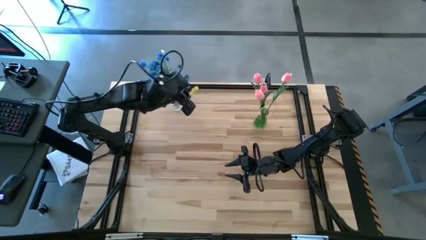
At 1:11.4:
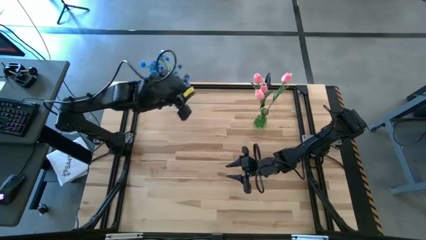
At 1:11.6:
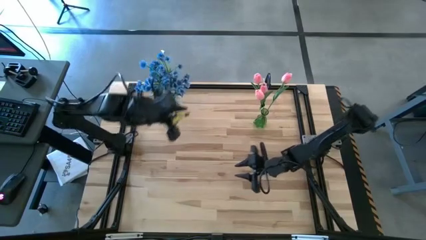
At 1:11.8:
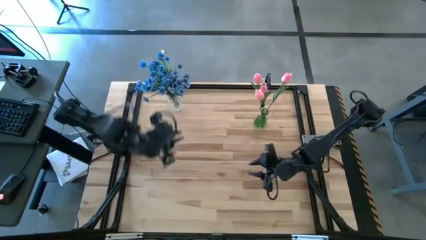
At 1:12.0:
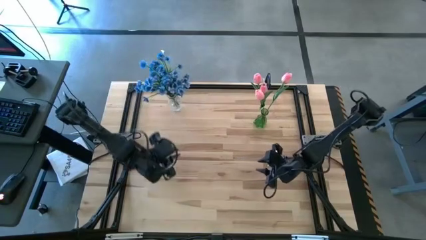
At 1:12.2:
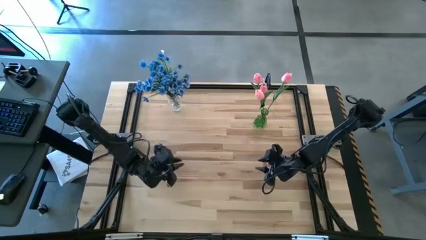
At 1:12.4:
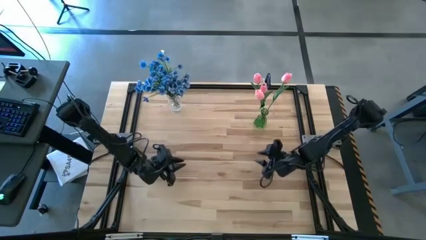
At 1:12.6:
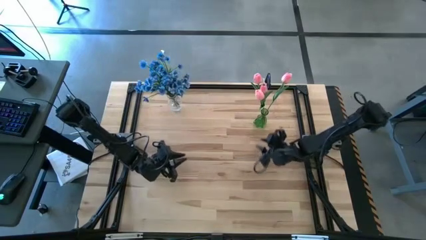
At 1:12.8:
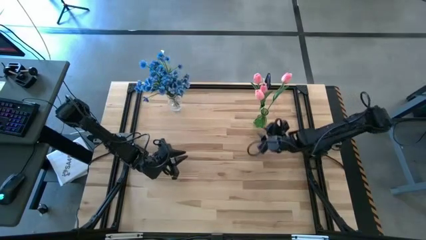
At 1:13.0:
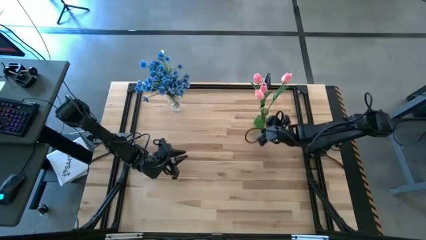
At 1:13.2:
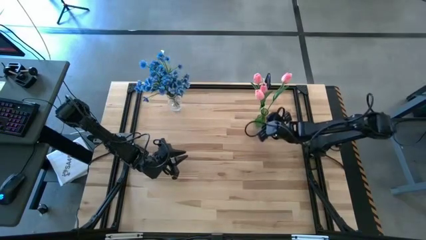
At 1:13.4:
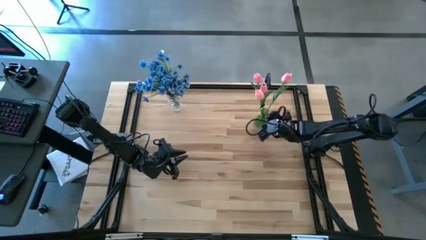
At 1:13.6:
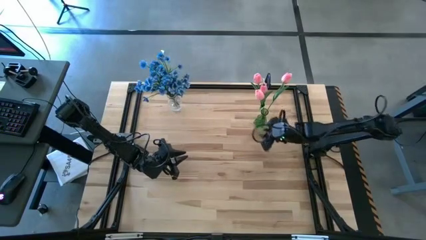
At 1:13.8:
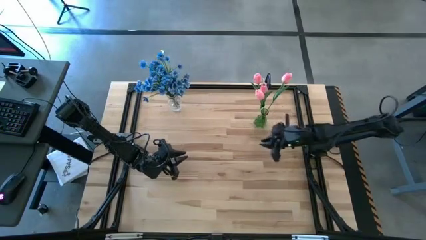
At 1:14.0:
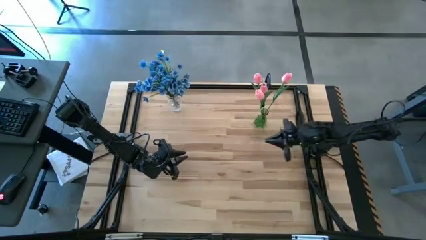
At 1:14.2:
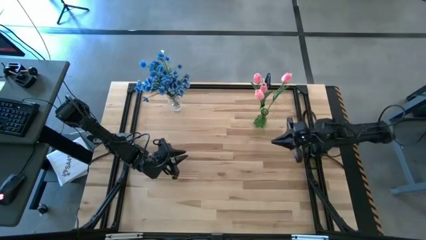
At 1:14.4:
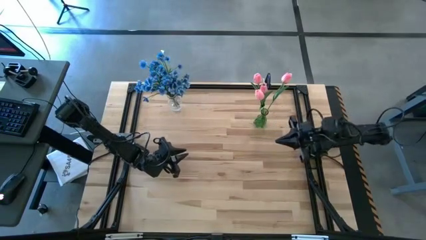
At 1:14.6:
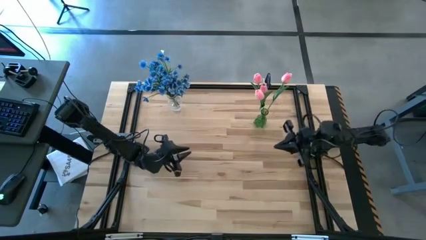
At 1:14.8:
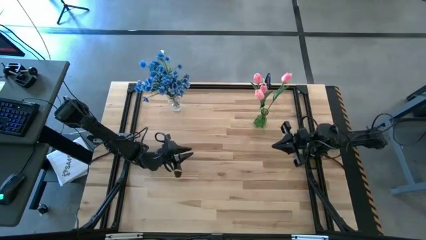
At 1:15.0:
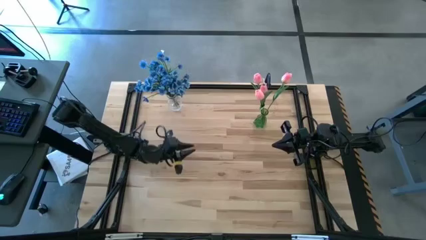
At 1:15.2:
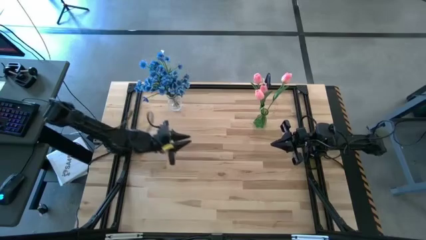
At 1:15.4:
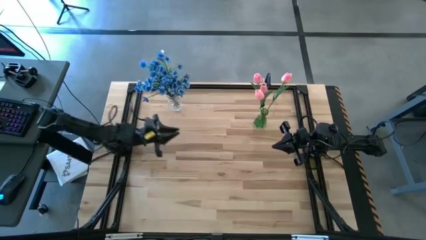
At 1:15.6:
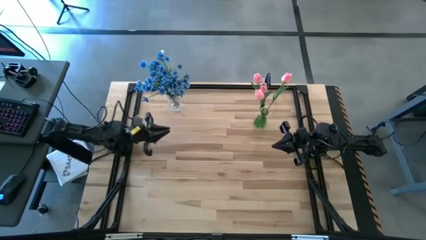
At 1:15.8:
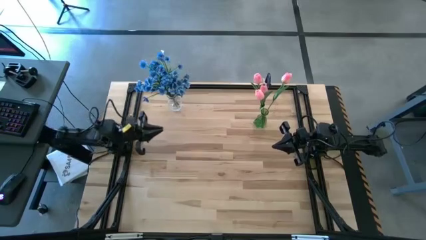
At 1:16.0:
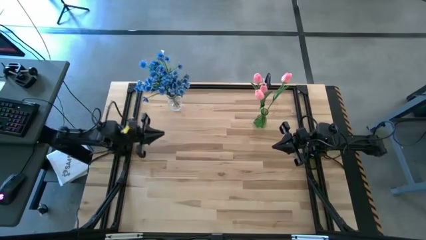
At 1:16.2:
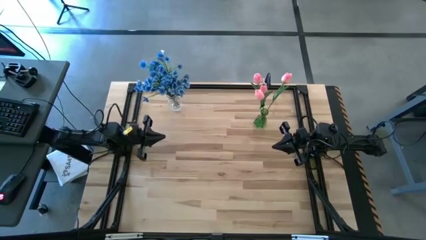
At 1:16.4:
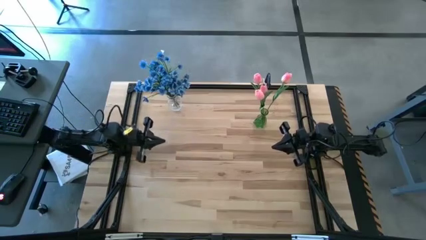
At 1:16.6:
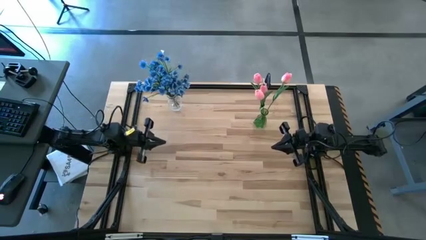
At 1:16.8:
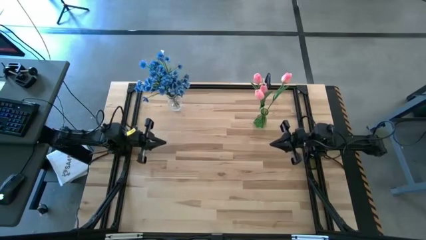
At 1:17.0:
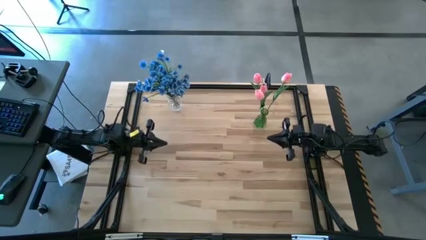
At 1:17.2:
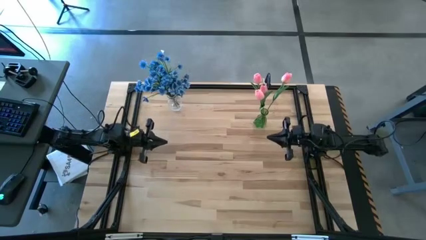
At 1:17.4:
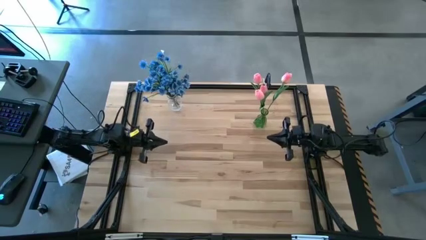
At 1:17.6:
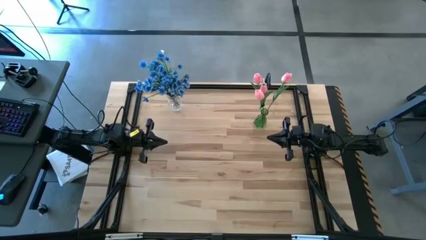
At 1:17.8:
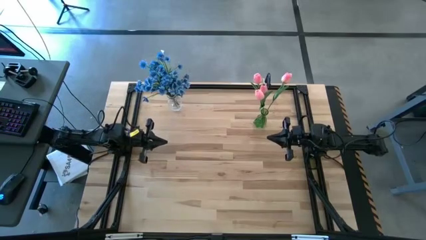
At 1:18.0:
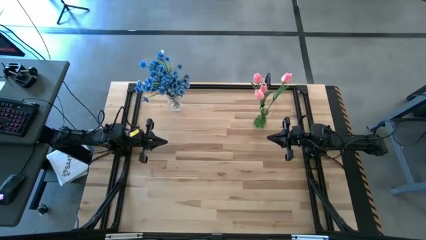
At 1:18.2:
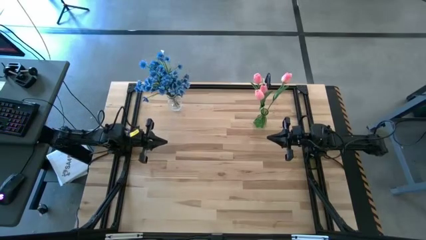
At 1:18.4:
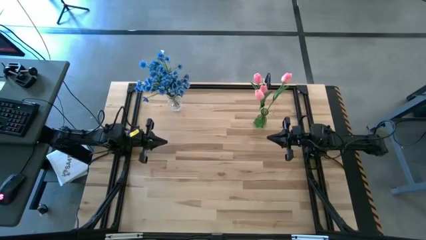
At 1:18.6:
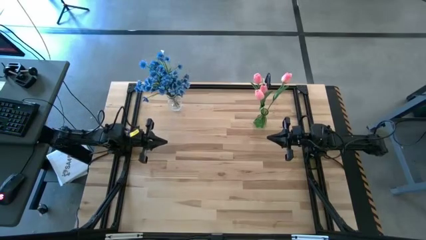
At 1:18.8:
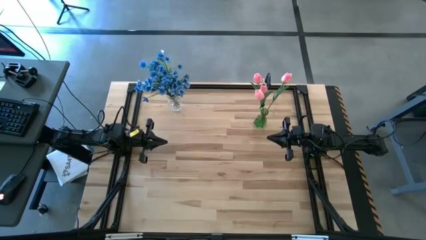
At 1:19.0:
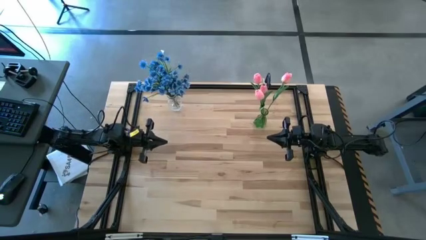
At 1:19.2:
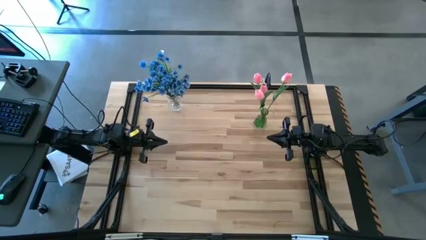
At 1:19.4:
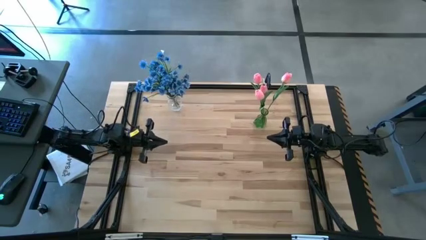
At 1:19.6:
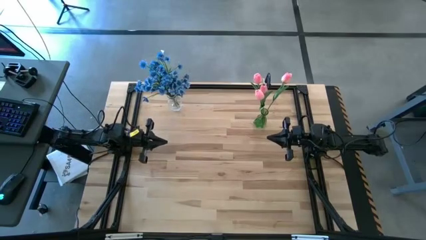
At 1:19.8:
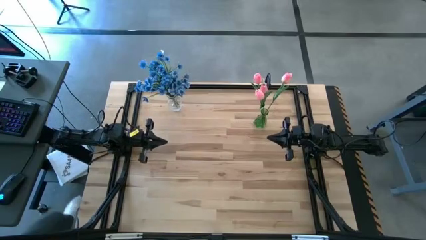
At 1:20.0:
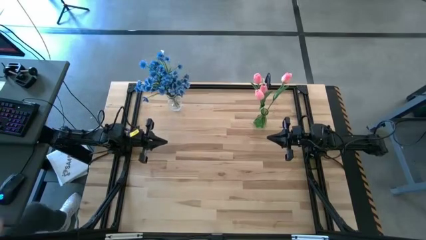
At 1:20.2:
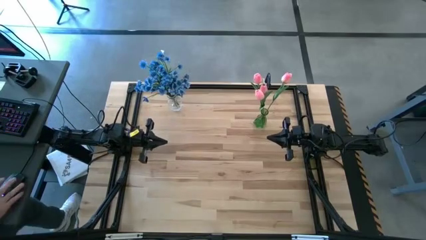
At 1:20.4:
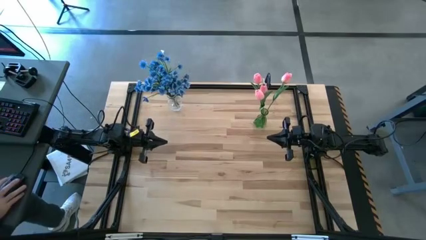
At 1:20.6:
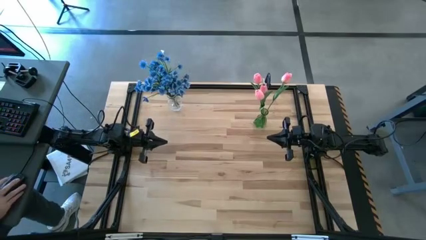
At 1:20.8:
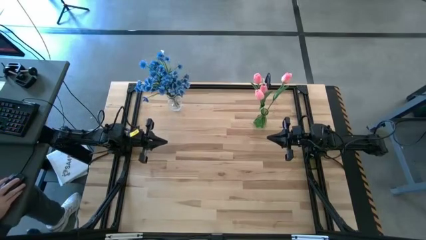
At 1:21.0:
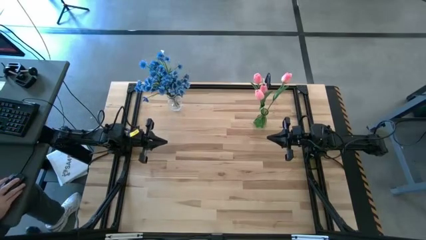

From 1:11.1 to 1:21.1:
Task: Sort flowers into vase by color
Return to Home Position
